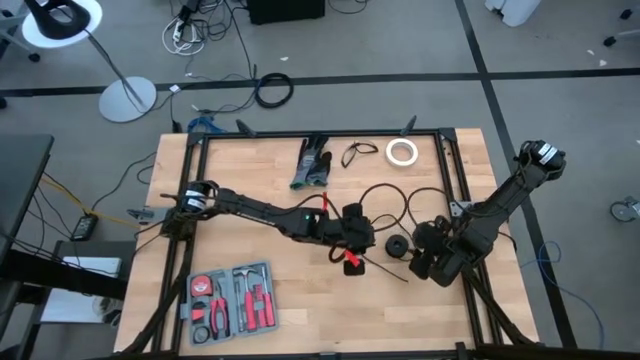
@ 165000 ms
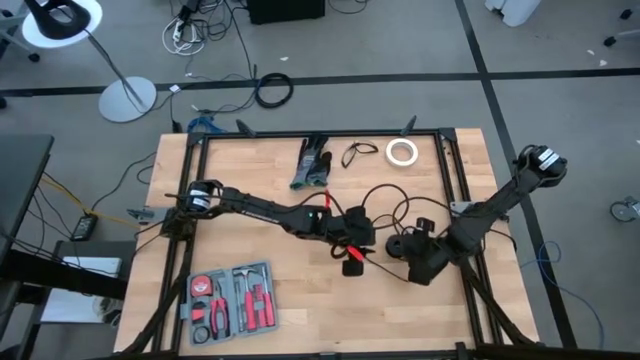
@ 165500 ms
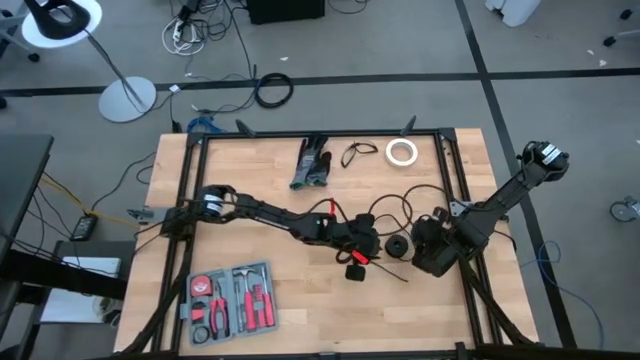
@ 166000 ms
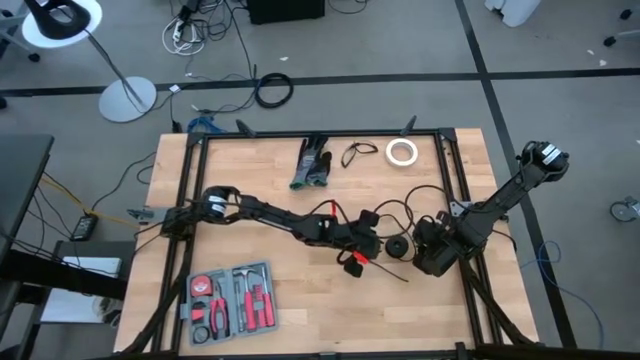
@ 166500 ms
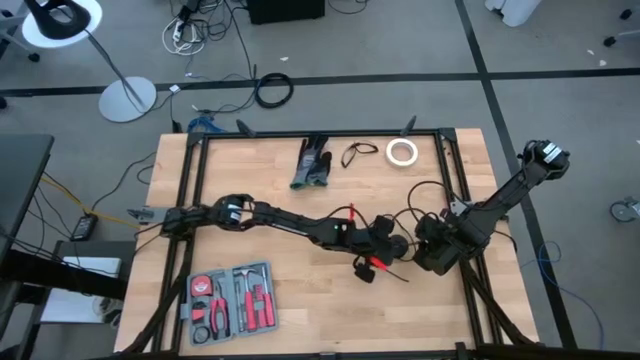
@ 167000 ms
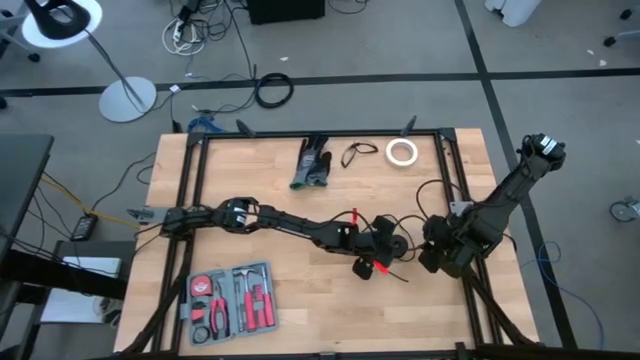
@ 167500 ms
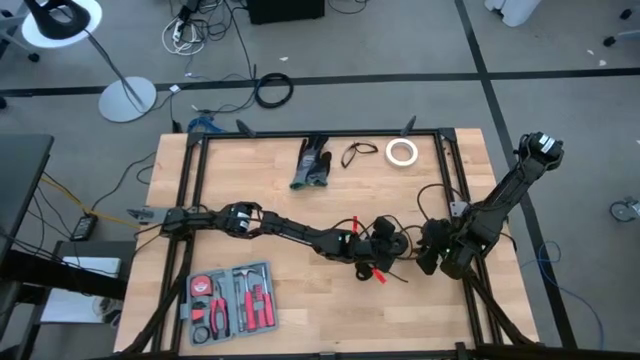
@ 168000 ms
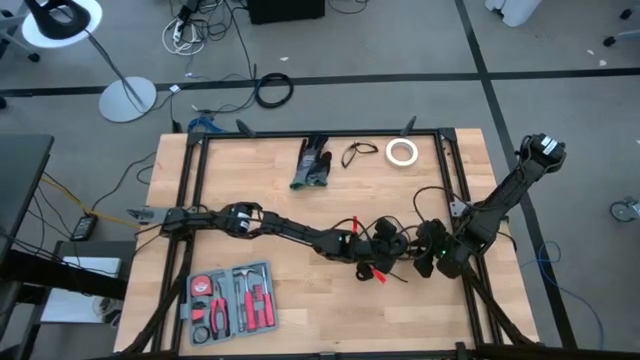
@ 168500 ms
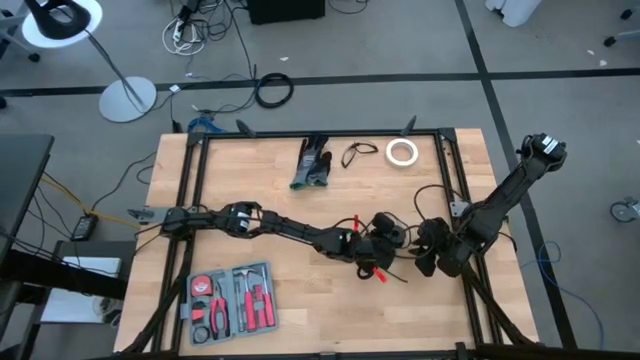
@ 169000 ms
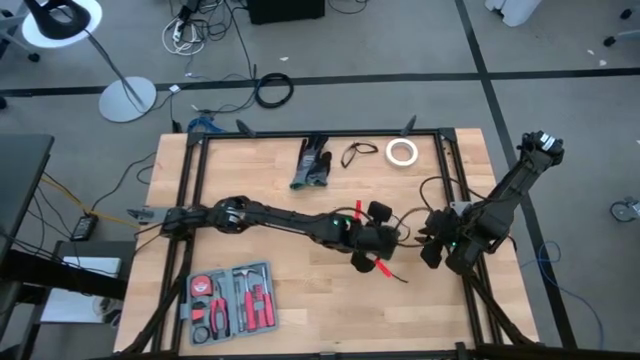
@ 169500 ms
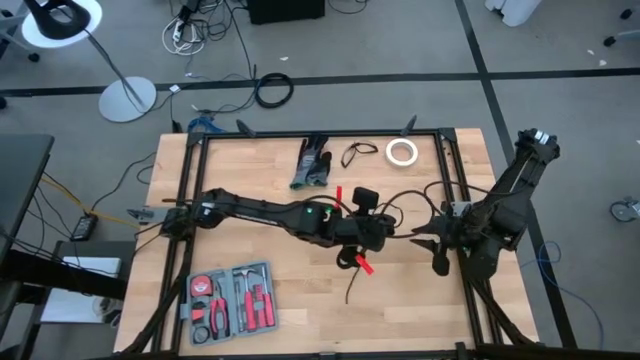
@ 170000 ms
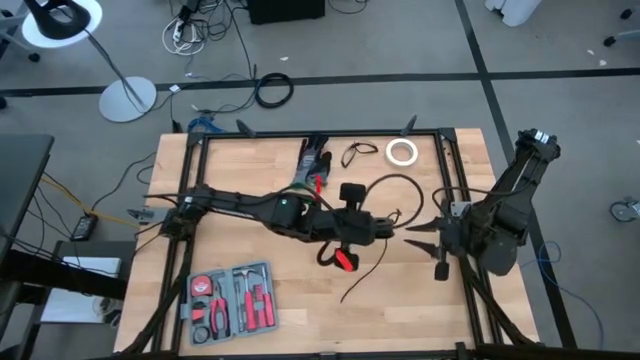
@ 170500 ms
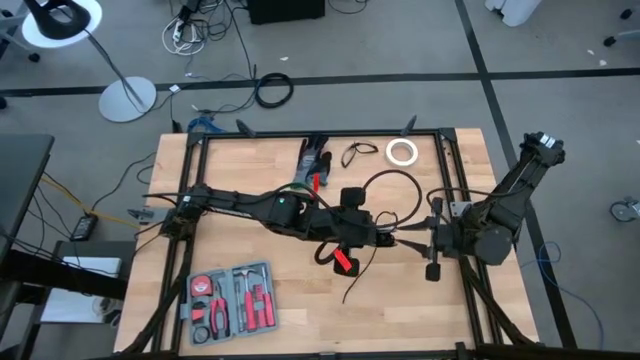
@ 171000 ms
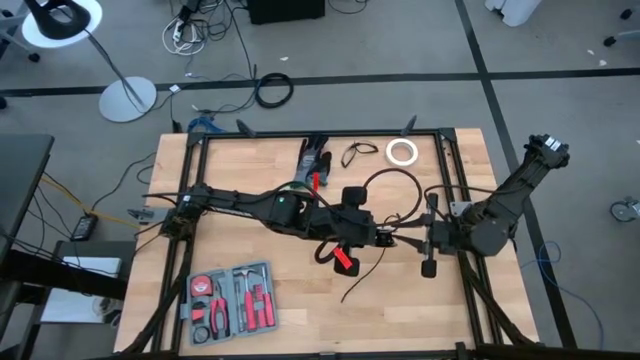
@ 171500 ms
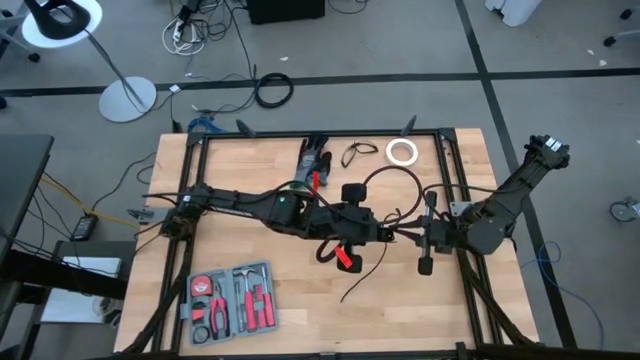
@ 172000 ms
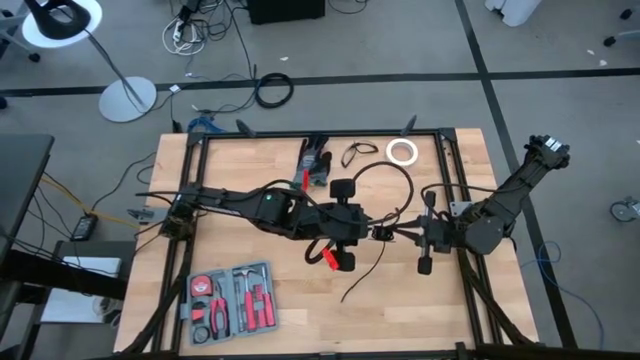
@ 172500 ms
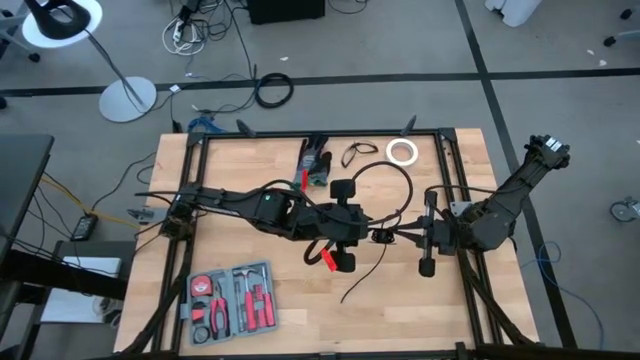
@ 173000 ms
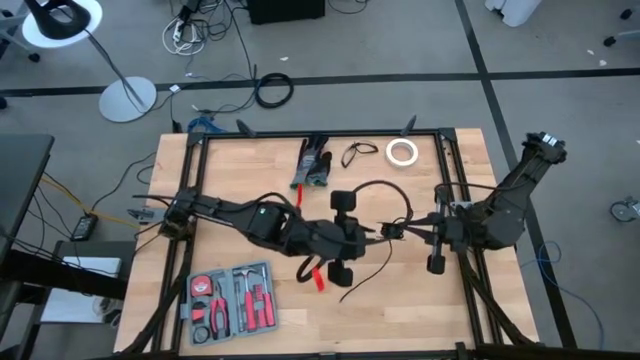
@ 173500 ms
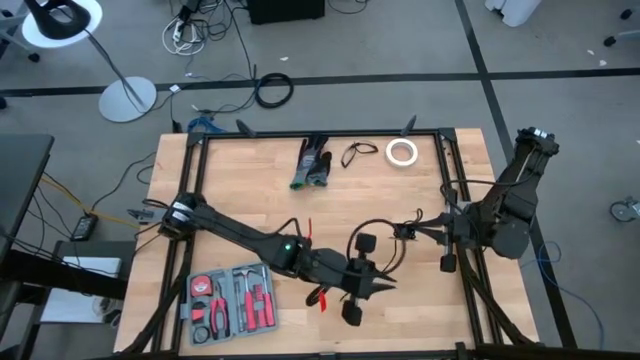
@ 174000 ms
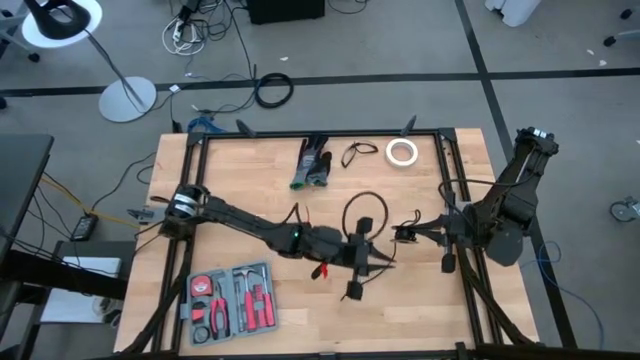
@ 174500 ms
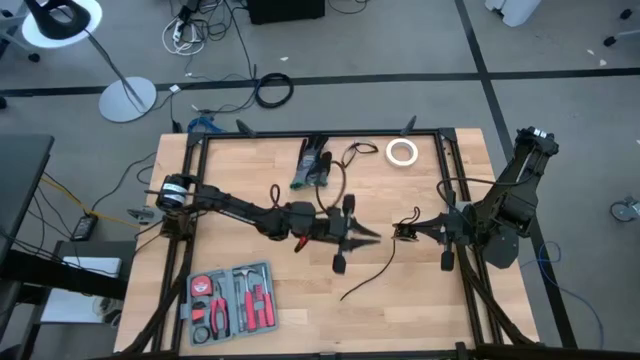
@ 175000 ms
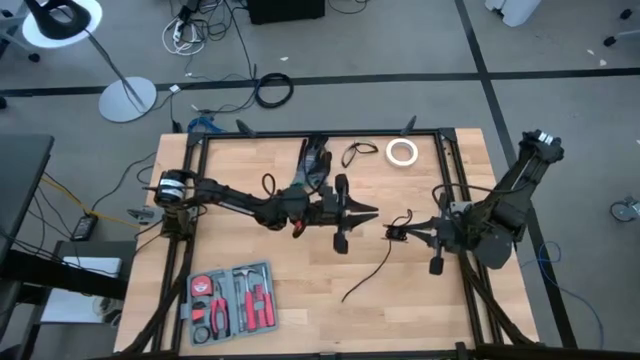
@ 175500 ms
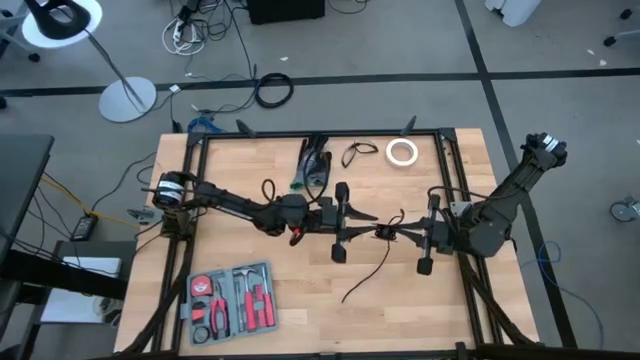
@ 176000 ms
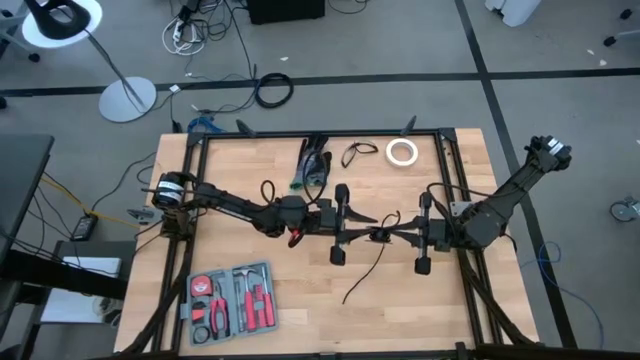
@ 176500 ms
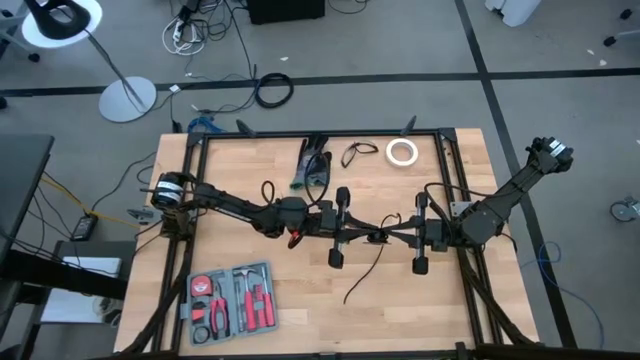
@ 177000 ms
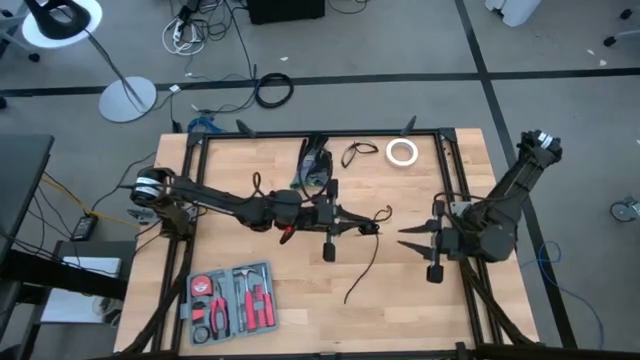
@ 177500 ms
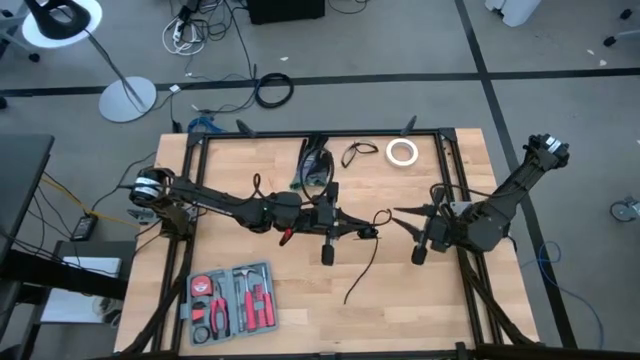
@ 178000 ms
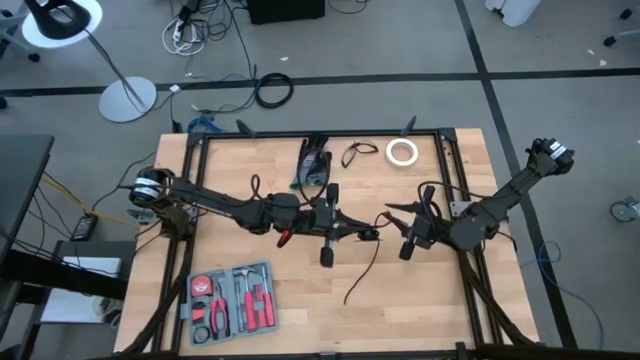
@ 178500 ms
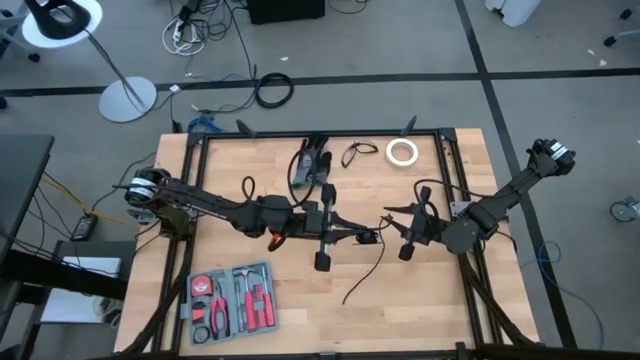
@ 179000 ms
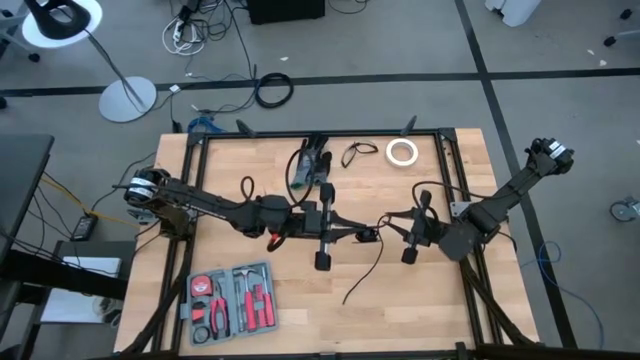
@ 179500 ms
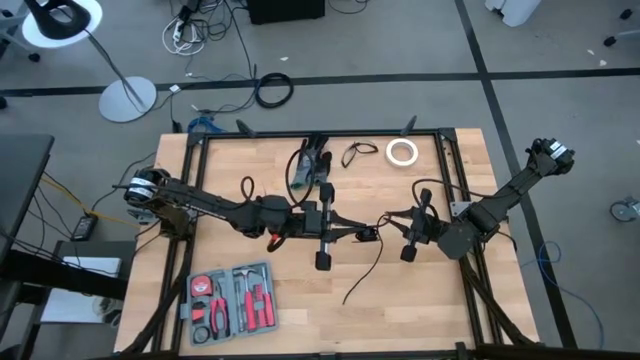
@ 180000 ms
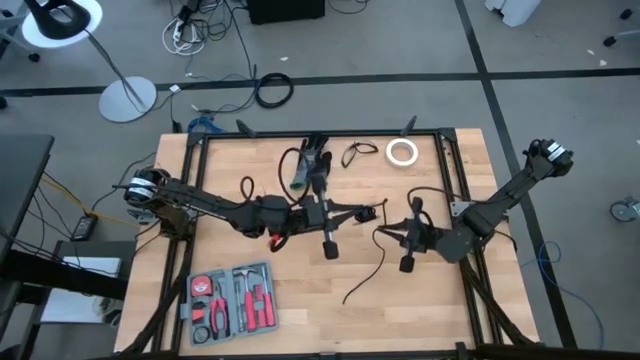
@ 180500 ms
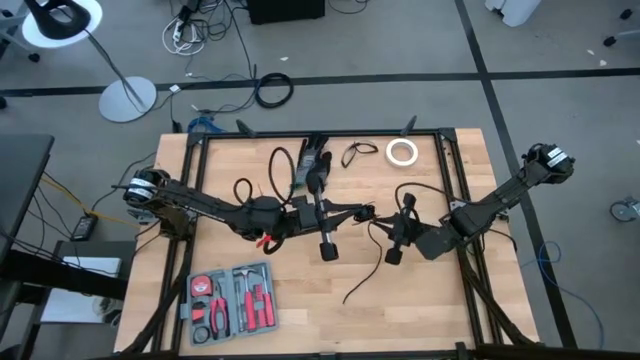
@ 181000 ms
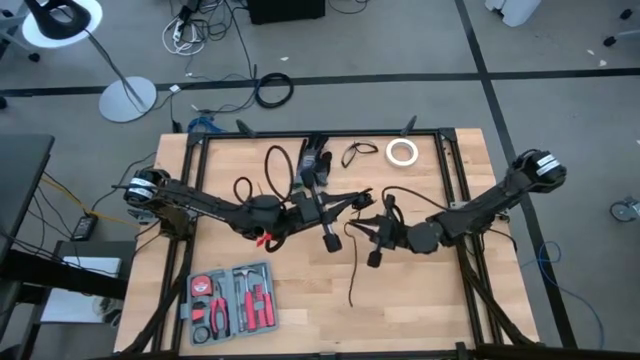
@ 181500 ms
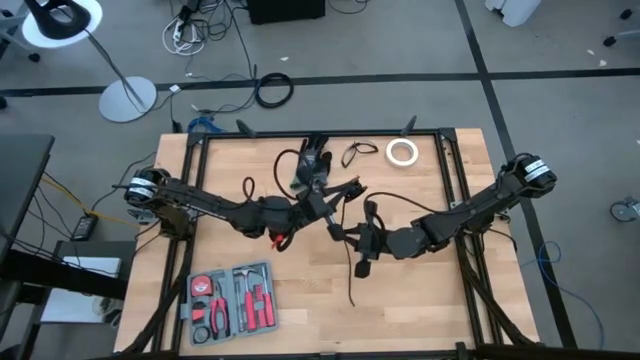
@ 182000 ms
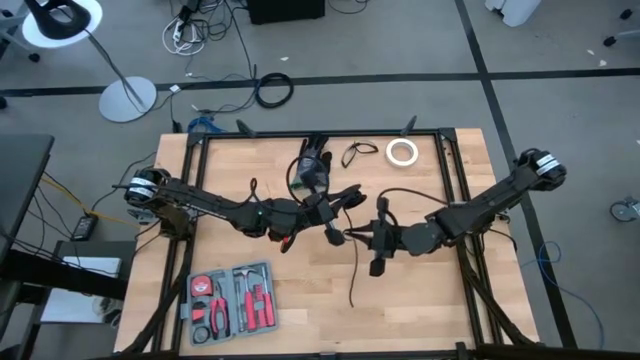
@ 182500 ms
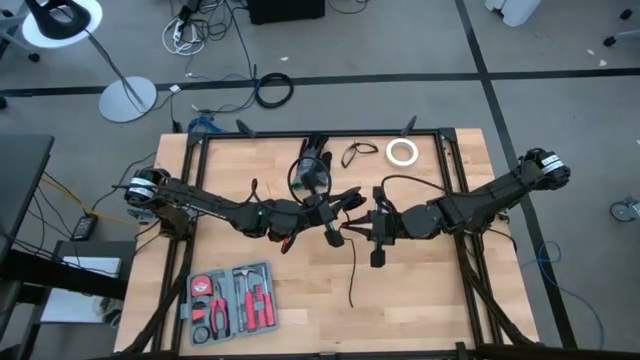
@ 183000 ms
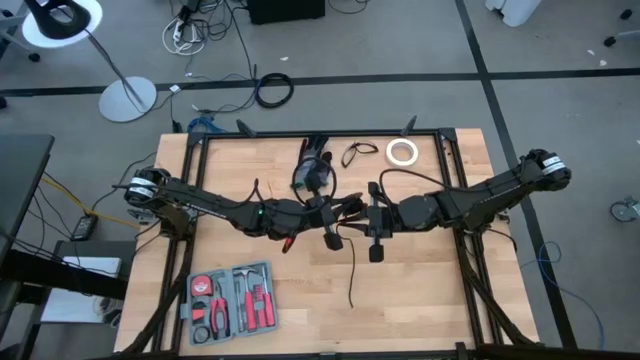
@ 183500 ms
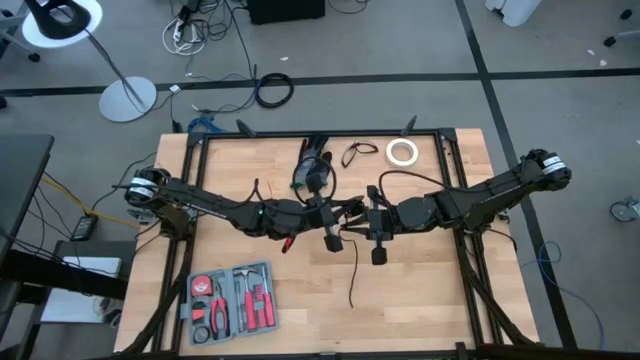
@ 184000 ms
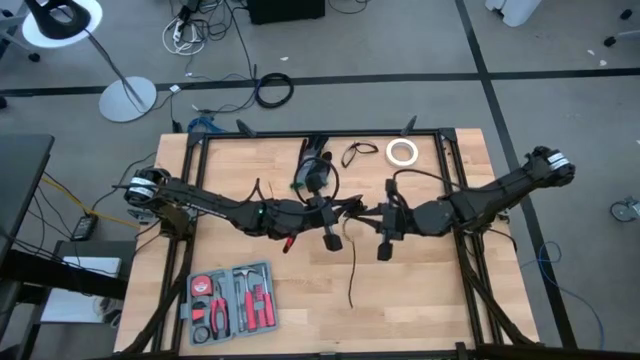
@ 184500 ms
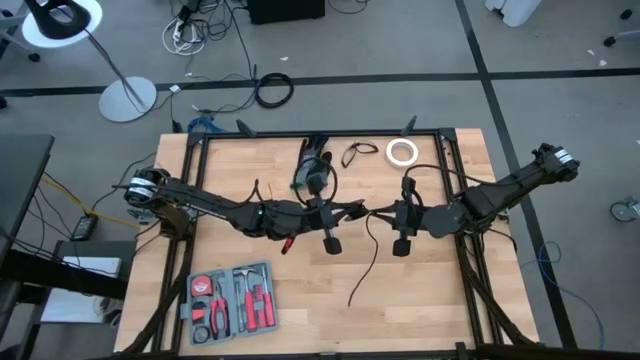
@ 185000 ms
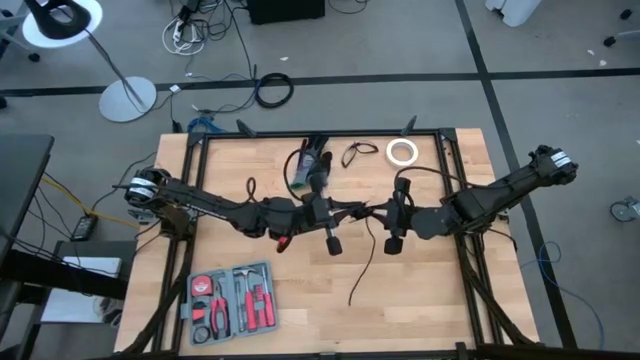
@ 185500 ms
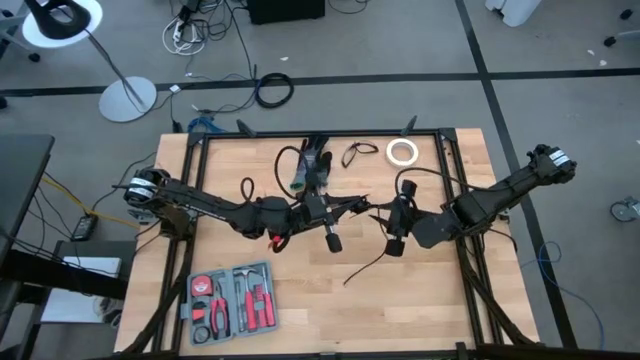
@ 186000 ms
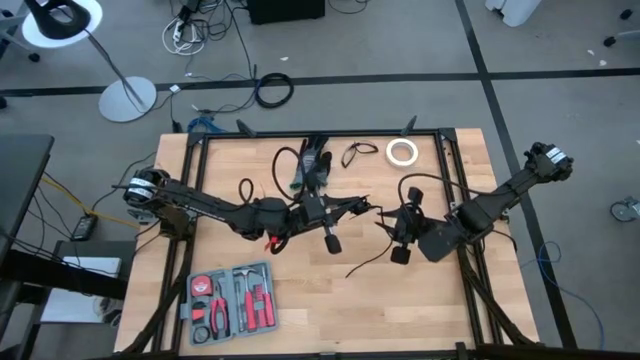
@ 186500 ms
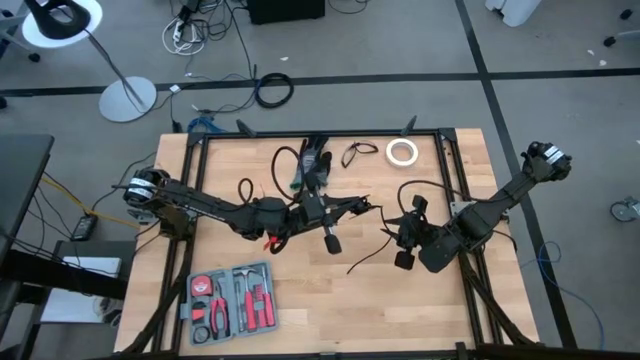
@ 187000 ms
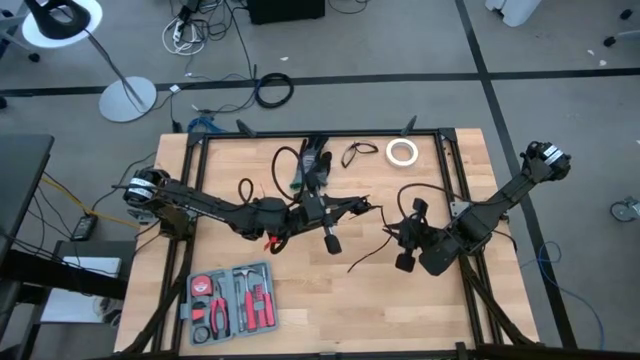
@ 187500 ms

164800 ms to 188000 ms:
Task: Coil cords
Coil the black wire into a spool
